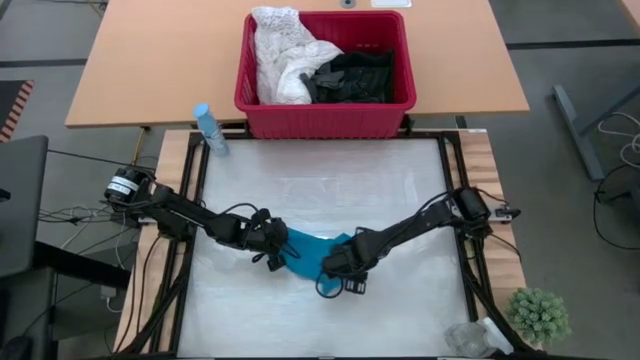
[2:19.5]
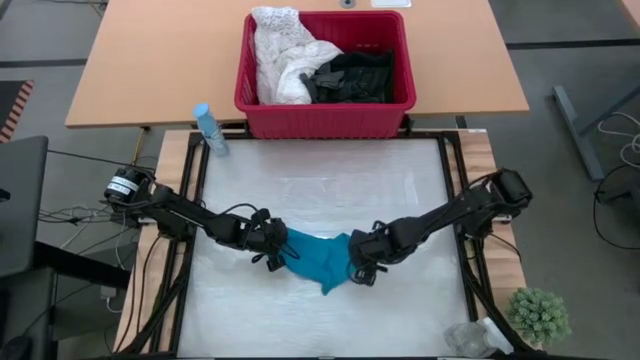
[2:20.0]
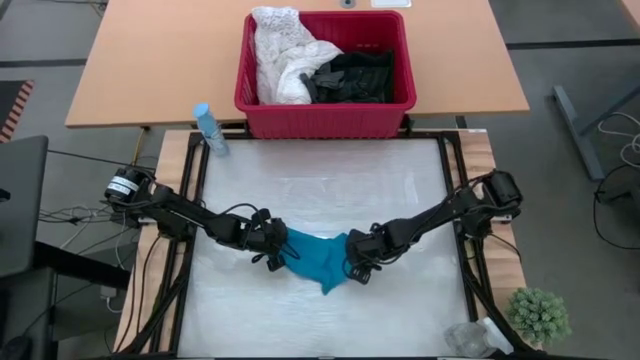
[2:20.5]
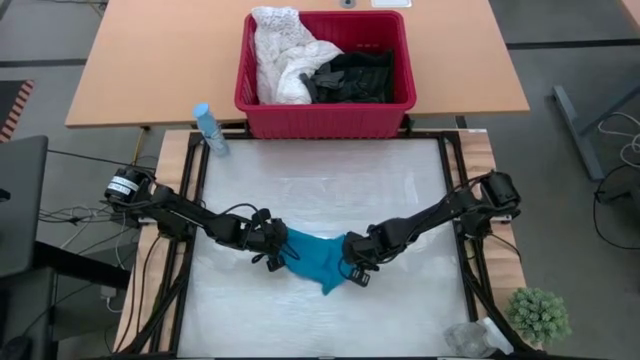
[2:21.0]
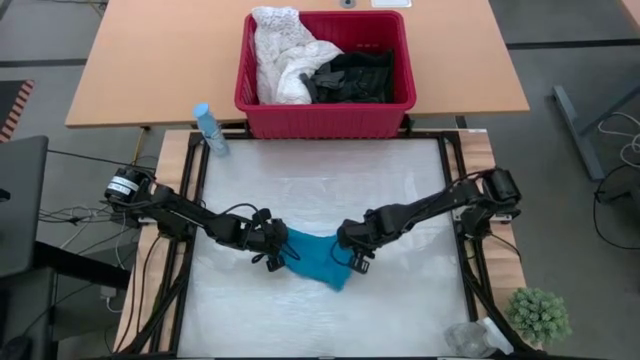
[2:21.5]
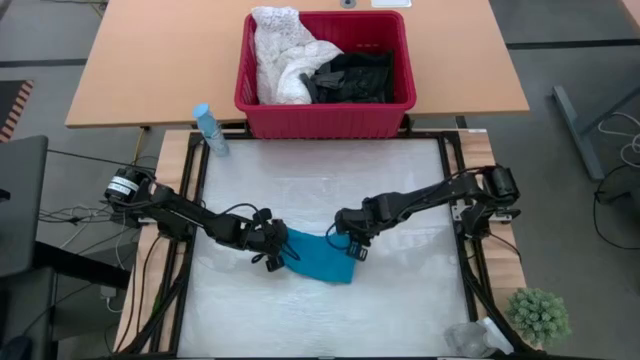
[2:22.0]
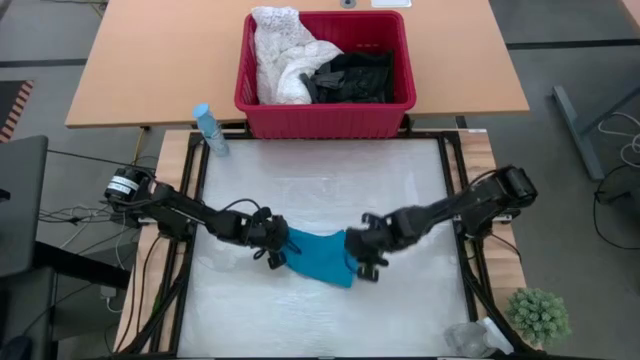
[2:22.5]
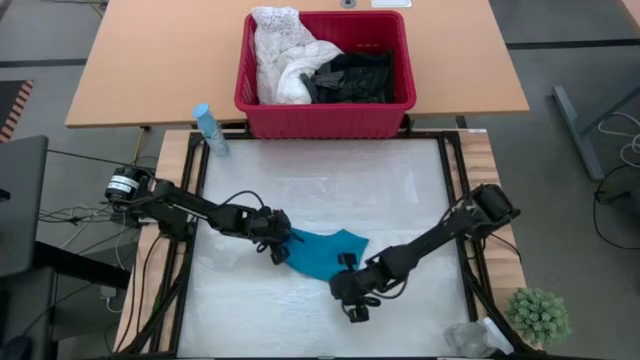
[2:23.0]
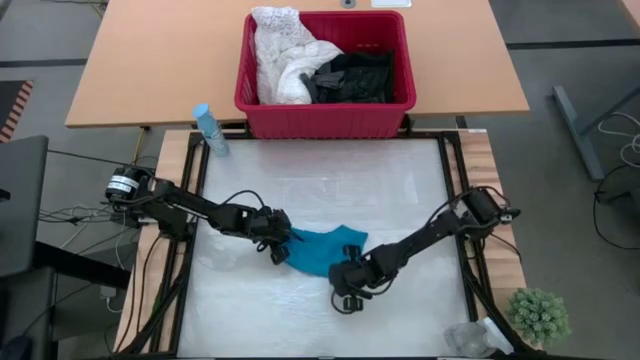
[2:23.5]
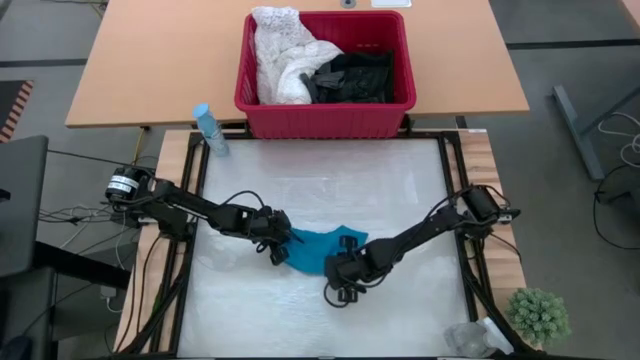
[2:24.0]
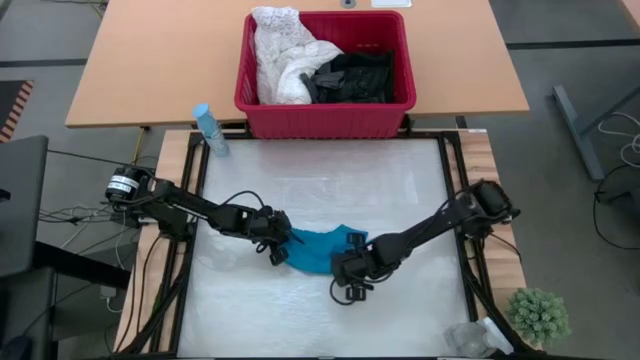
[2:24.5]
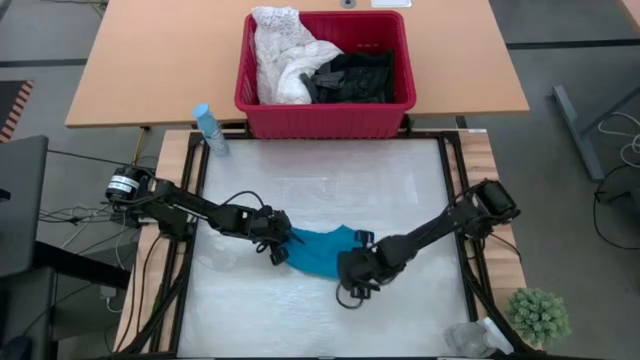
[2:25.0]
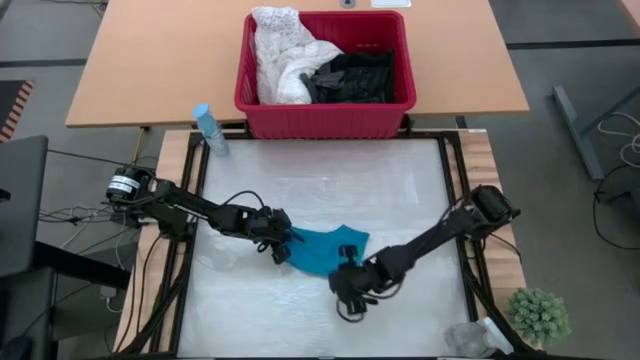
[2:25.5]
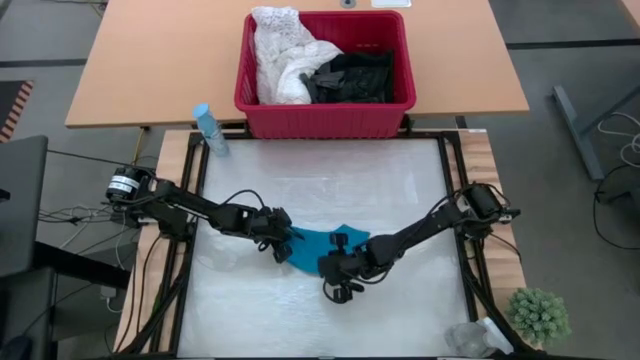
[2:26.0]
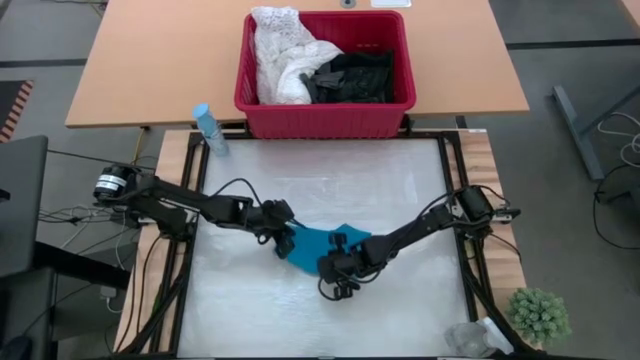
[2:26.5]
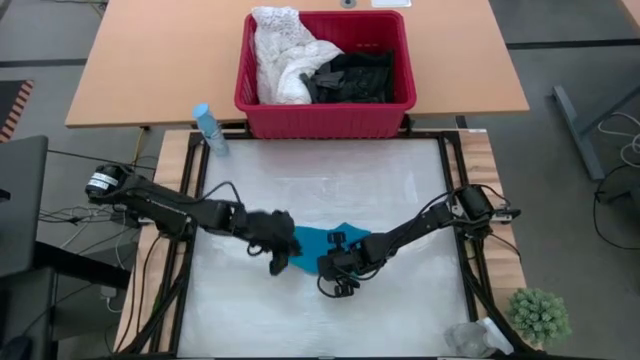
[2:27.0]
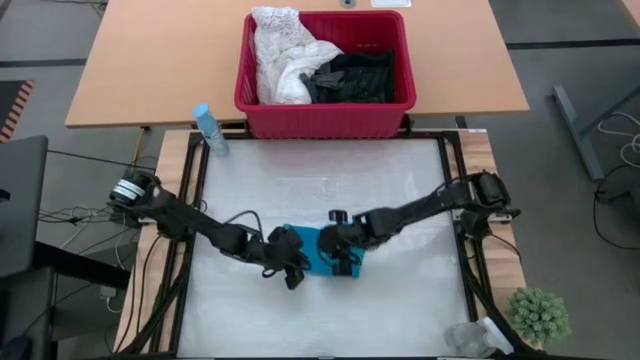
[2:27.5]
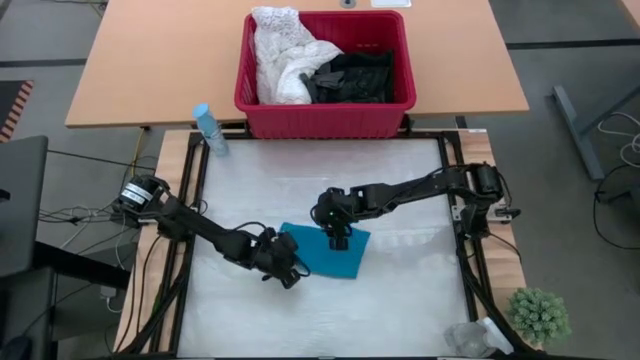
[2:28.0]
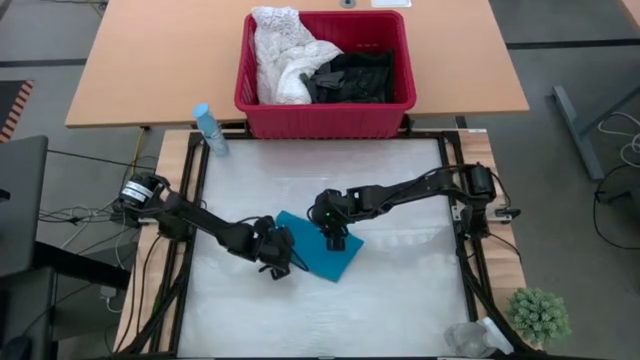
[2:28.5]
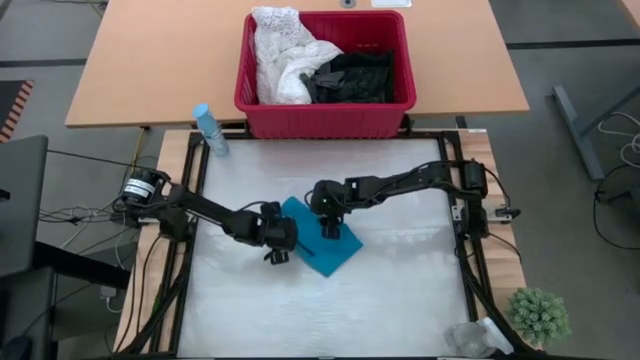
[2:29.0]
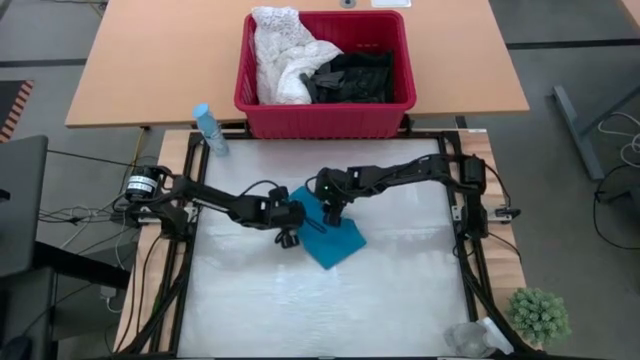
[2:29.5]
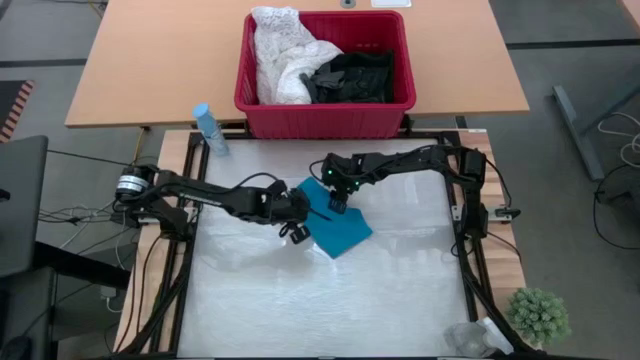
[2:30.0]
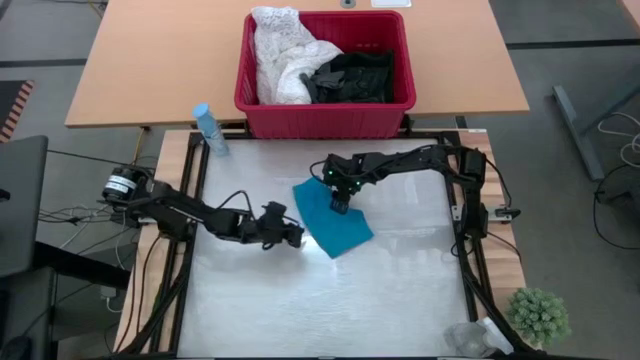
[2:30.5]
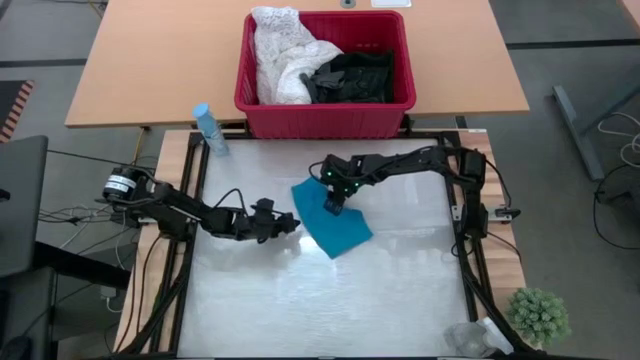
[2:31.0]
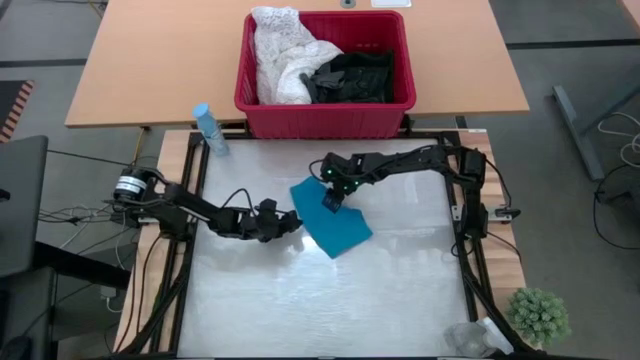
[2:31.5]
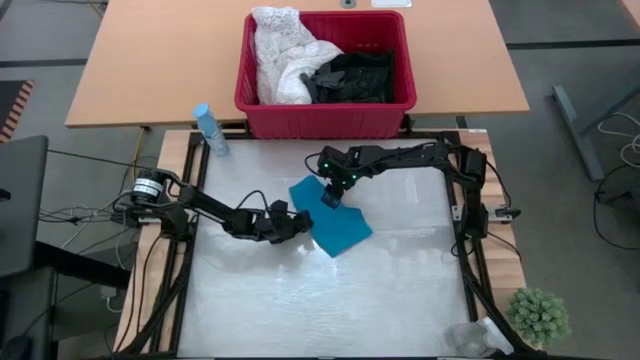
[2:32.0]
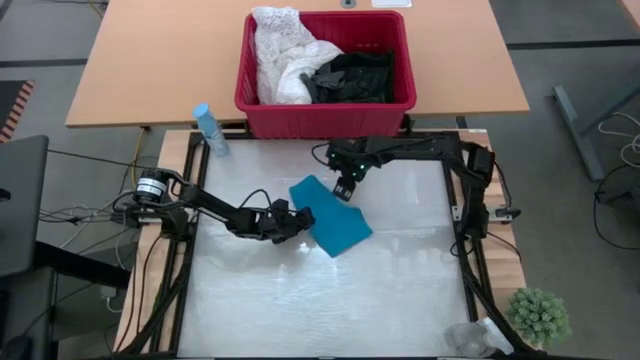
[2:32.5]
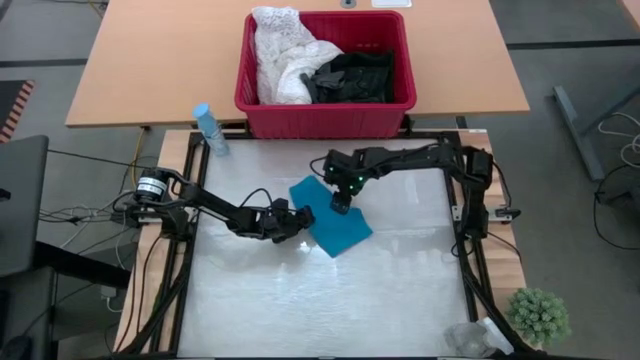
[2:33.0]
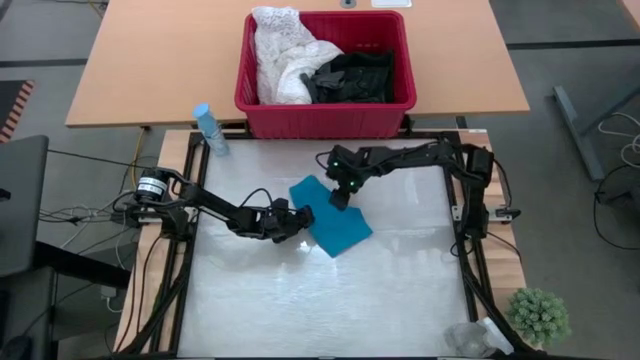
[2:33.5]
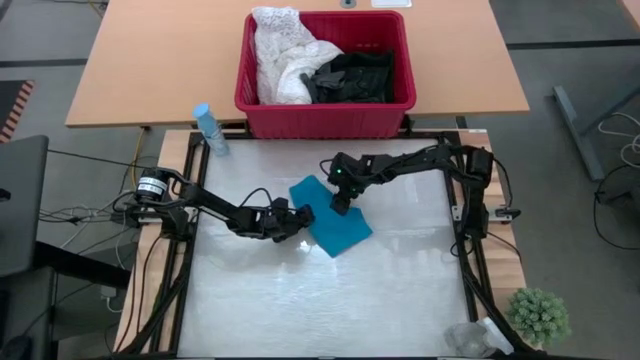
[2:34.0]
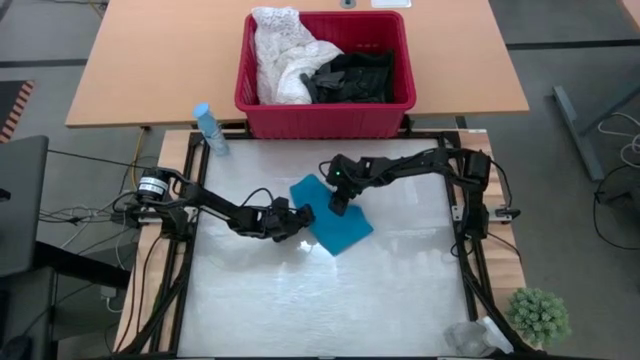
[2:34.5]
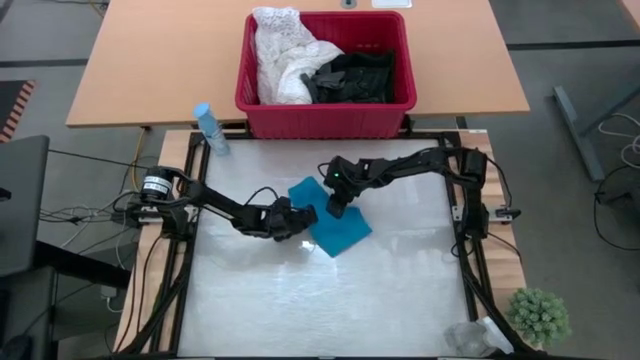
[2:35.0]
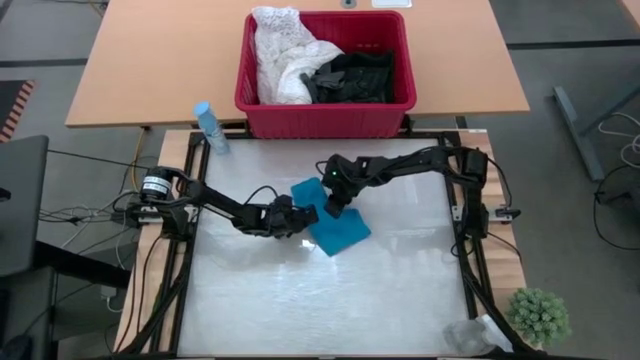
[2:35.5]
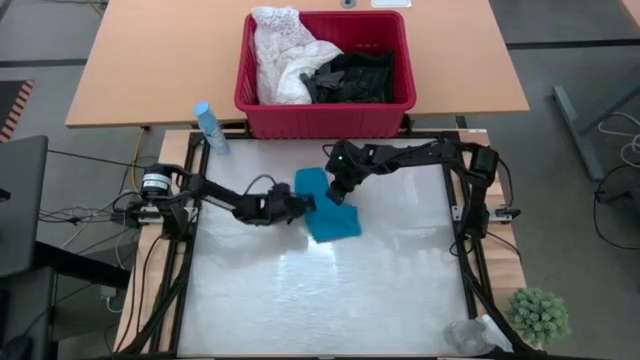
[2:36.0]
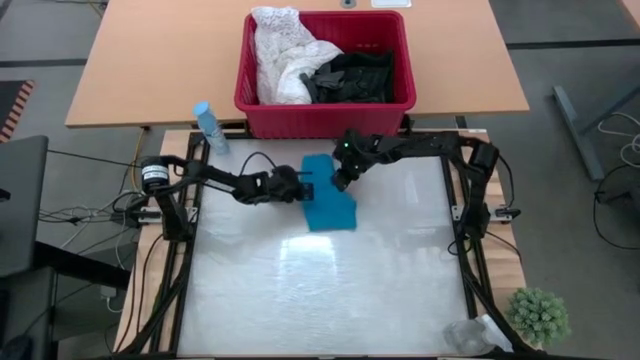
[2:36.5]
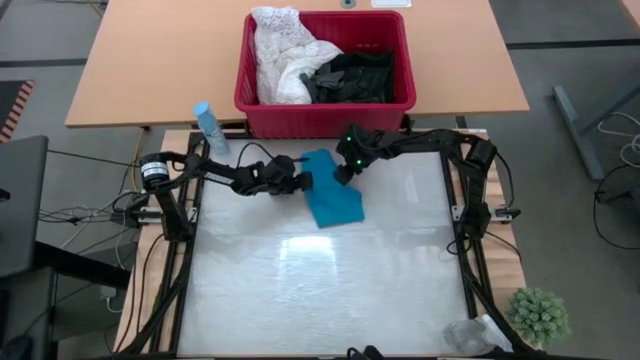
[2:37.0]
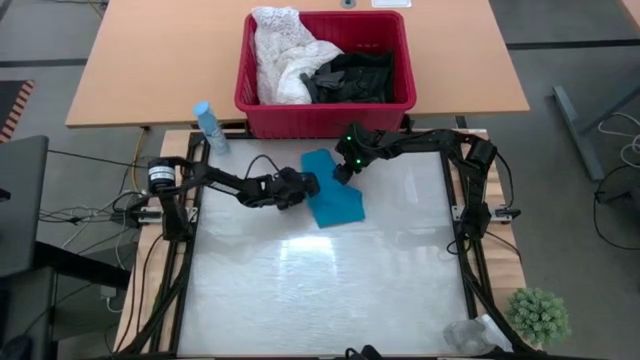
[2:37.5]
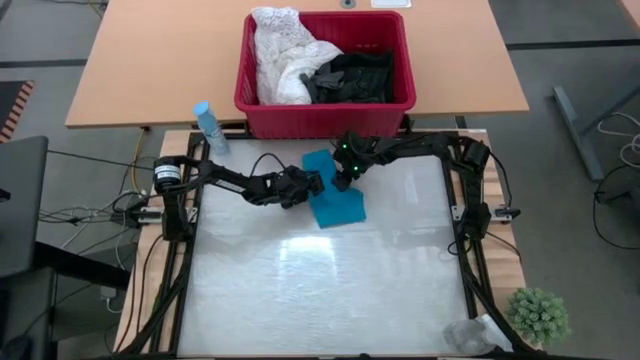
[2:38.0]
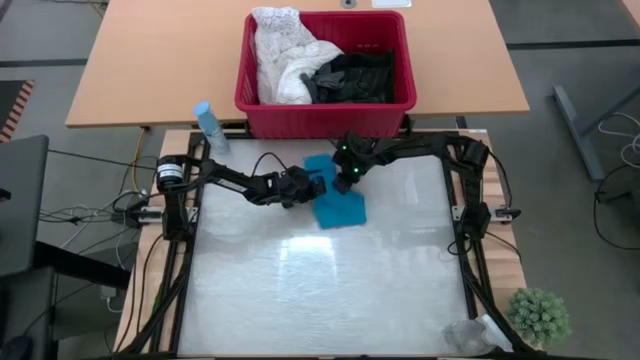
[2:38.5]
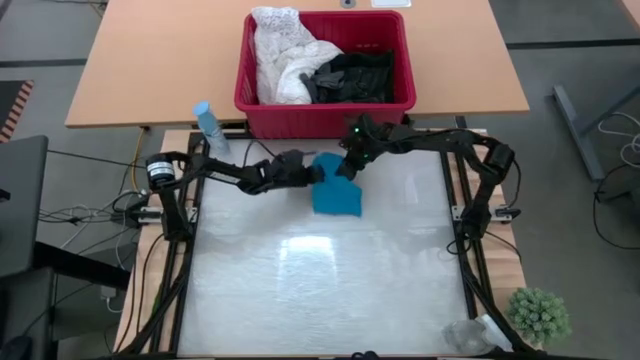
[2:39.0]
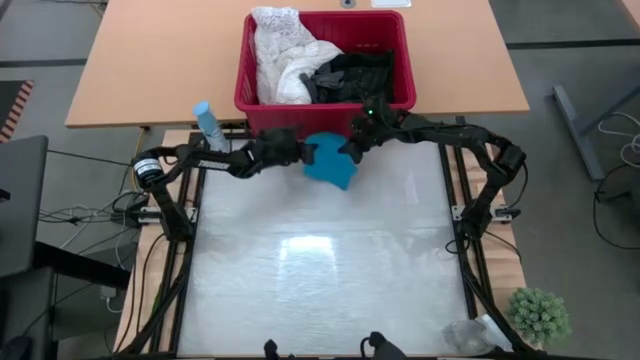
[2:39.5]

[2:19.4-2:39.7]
Task: Fold laundry
Fold the blue shorts

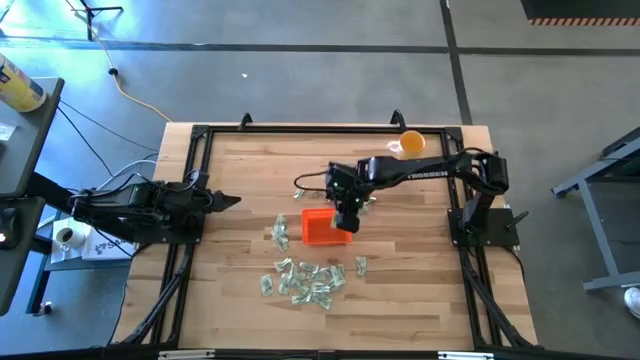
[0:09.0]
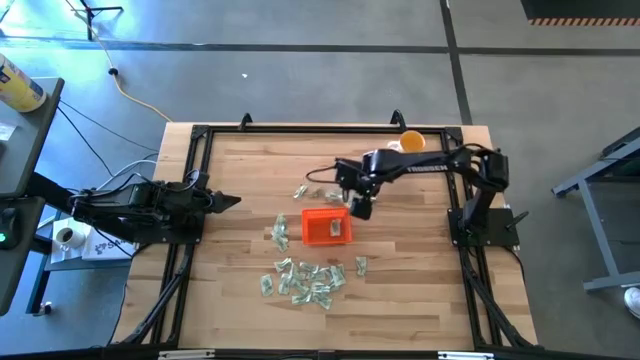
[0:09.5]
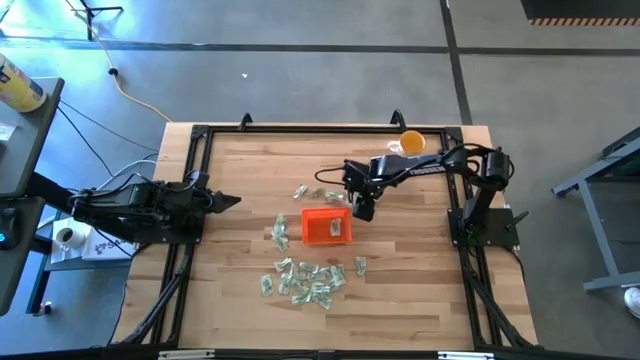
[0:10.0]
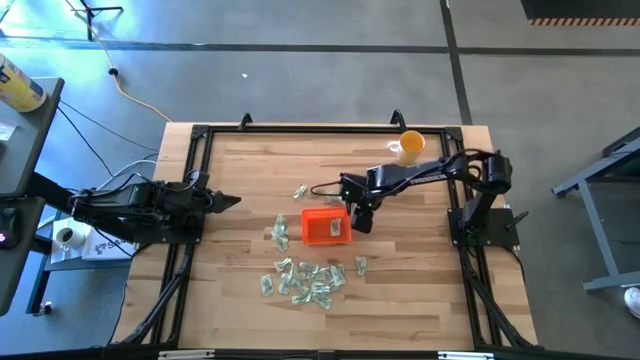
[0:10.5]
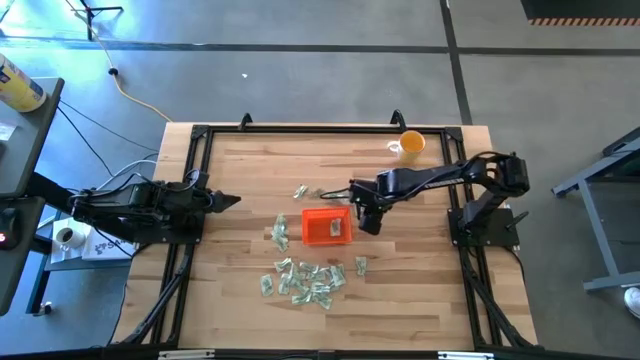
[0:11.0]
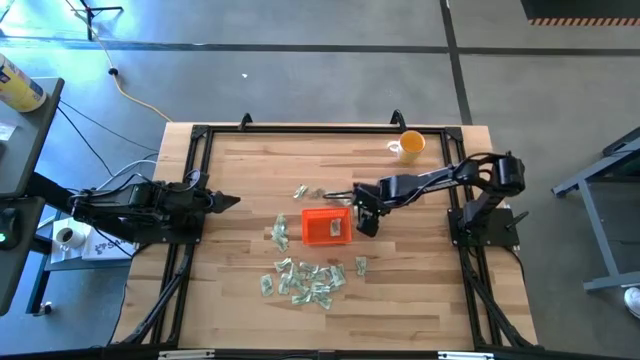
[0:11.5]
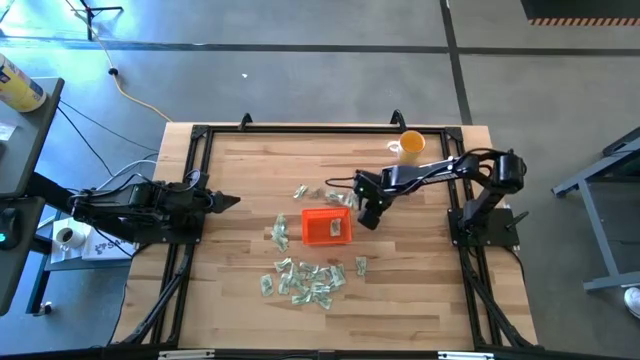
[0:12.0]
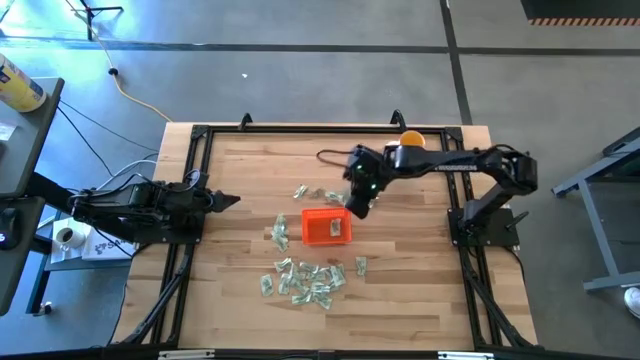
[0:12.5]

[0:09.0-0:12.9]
Task: Pick and place Stevia / Truvia into bins
Put the stevia packet into the orange bin
